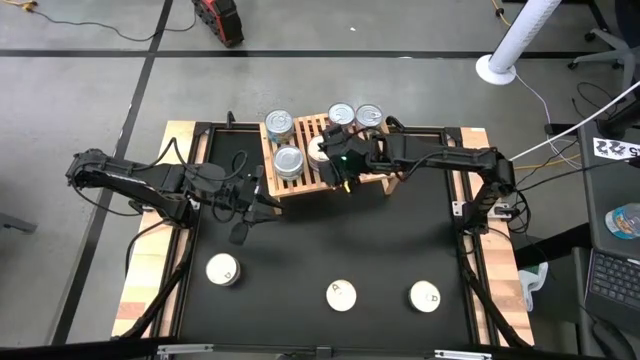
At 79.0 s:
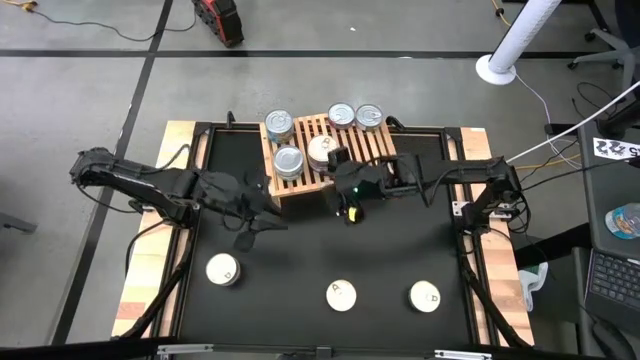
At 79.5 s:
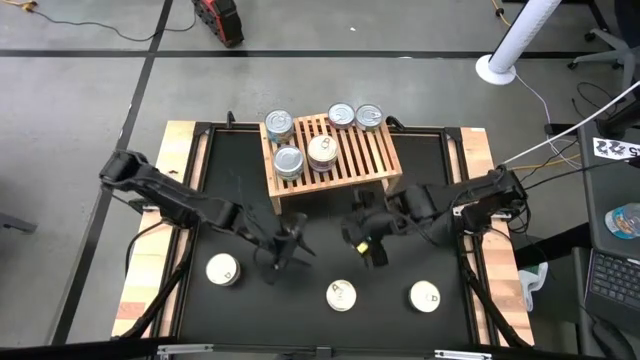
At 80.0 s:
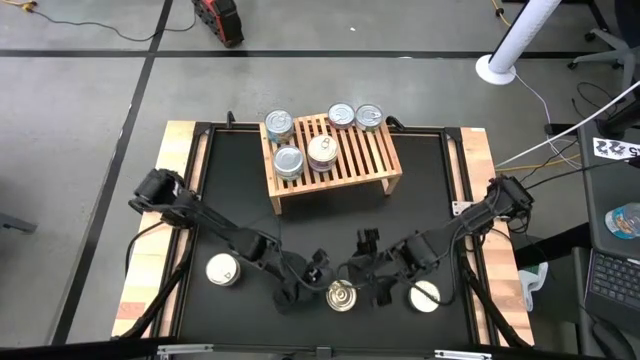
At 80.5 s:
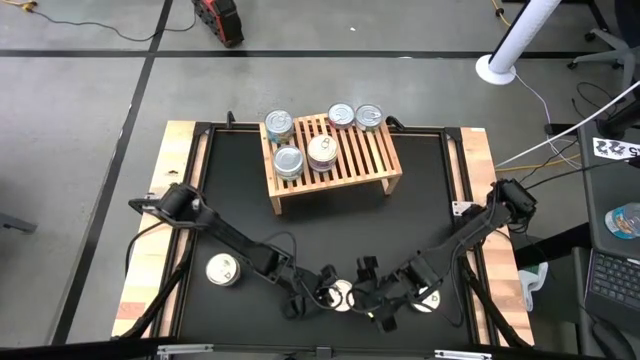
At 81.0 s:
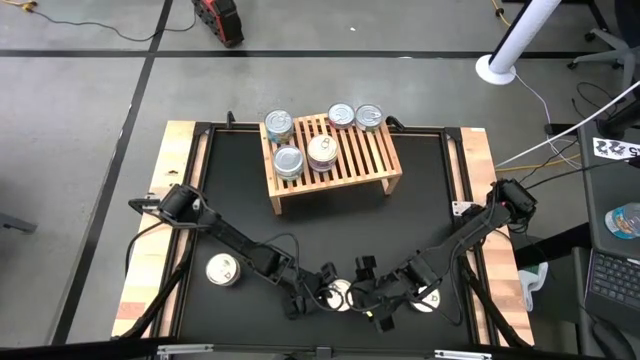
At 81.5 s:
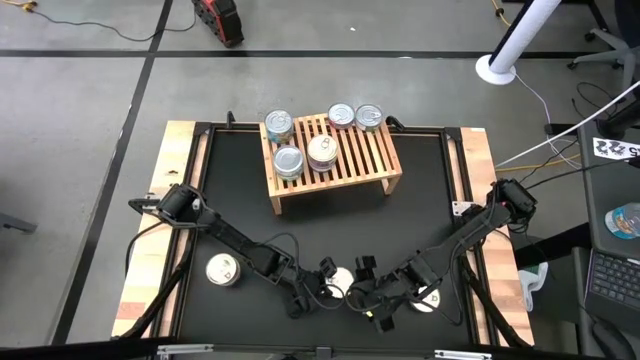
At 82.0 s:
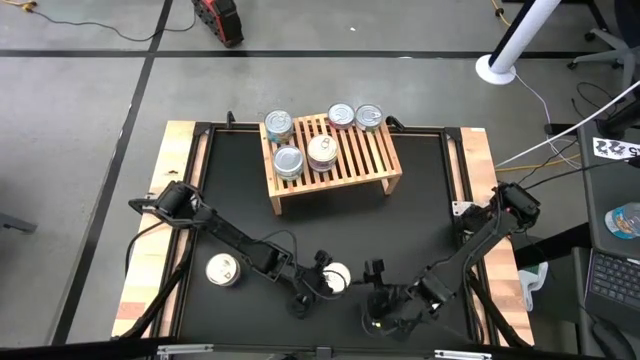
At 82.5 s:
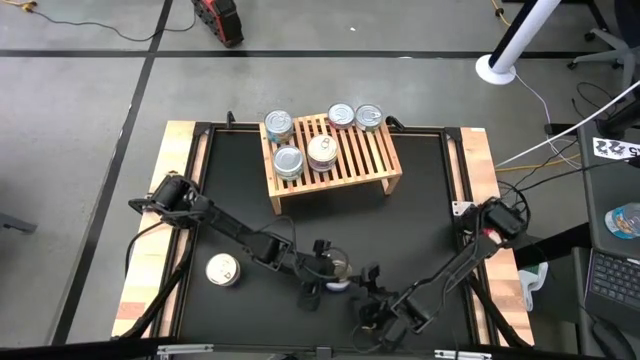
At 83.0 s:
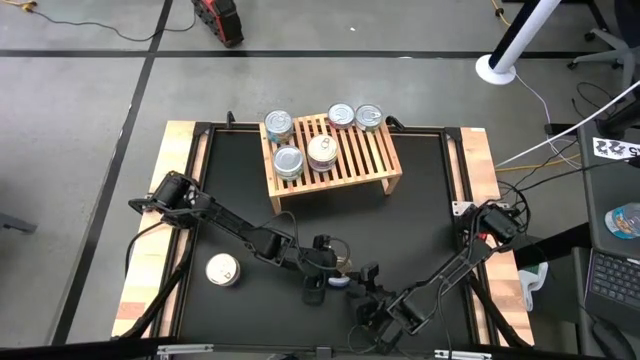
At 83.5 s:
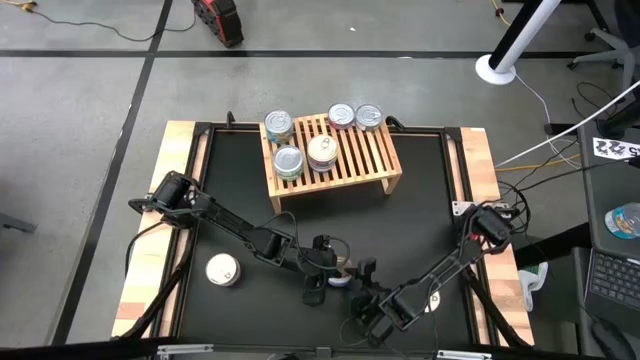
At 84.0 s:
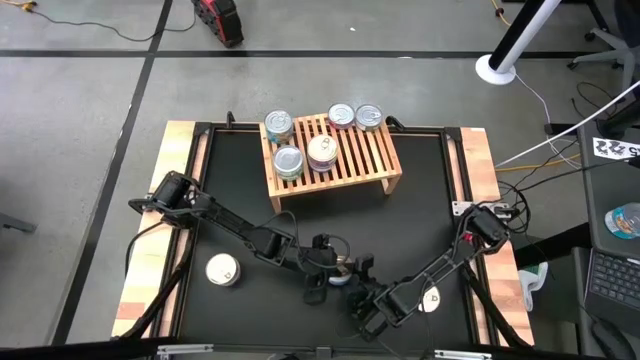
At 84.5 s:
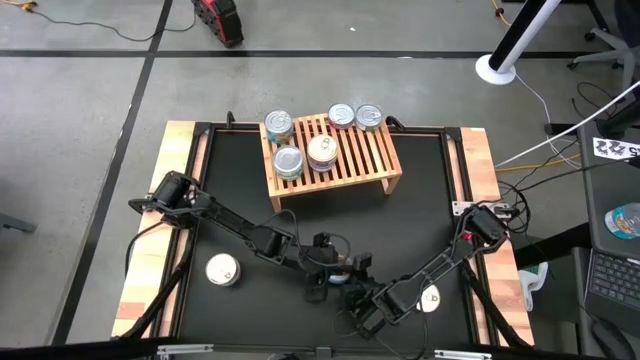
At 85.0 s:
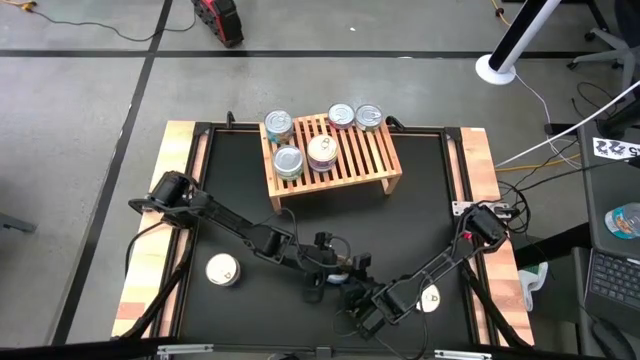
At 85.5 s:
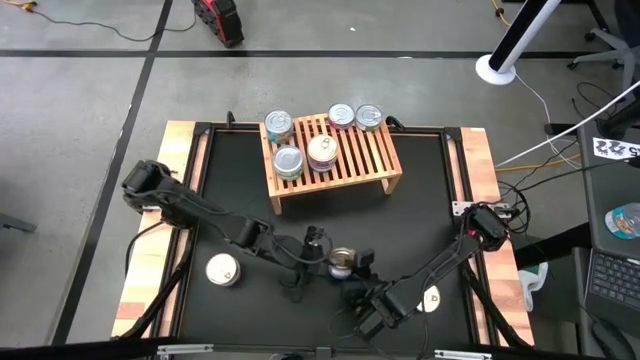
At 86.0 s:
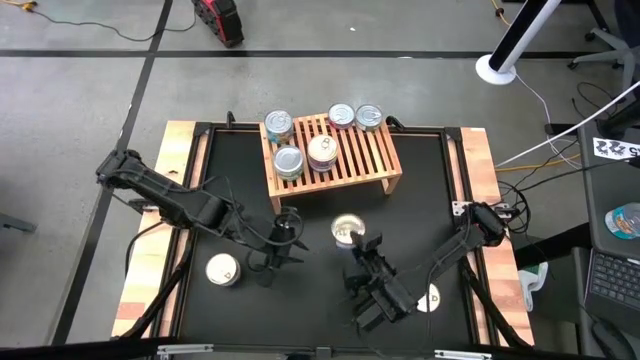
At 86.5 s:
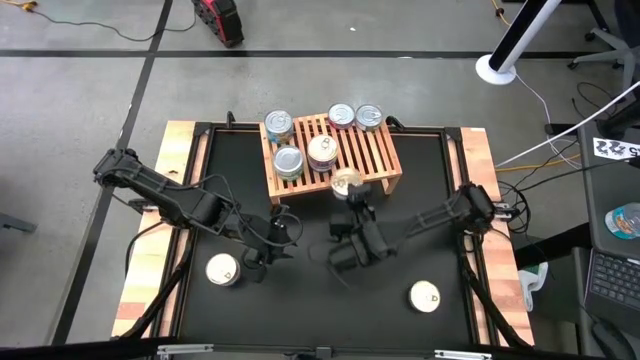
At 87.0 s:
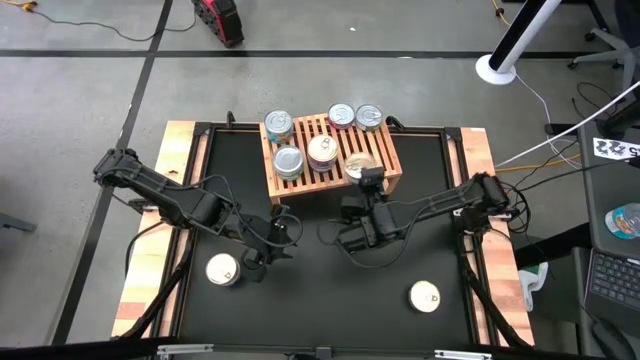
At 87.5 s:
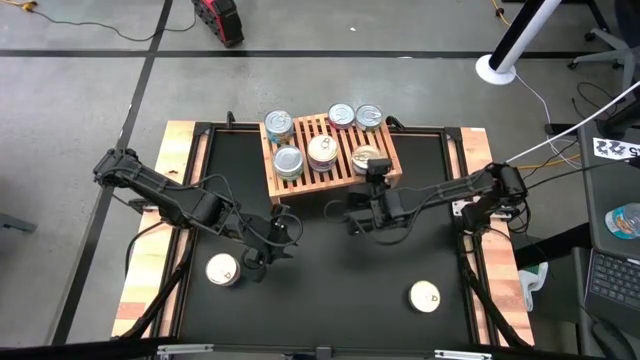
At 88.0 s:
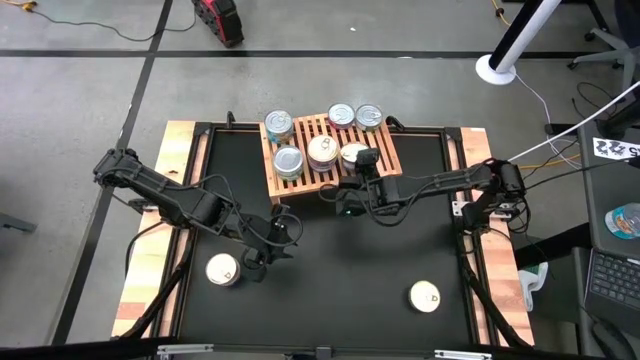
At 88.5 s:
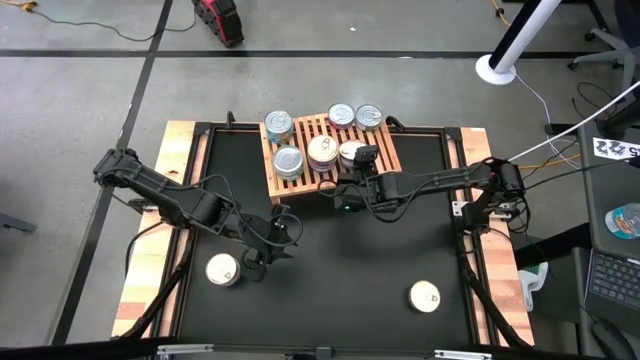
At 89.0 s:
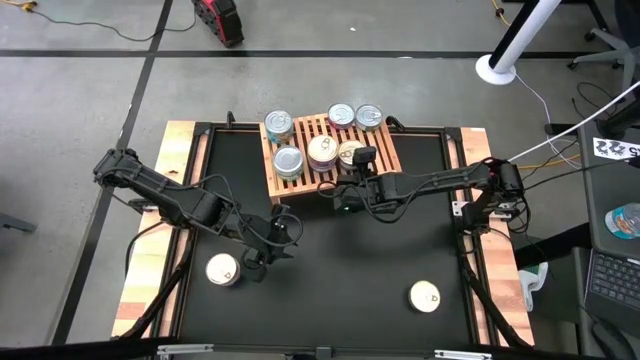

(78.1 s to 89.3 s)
Task: Stack canned seafood by type on shelf
Put the blue tuna can on the shelf

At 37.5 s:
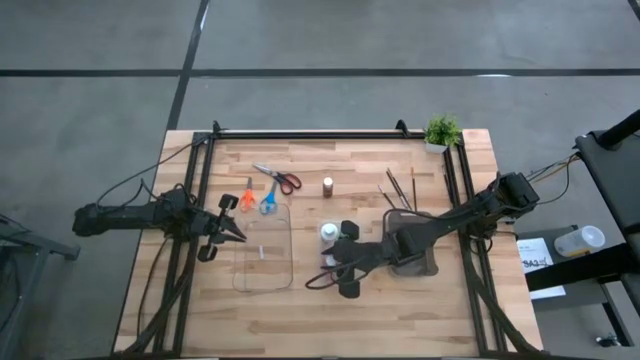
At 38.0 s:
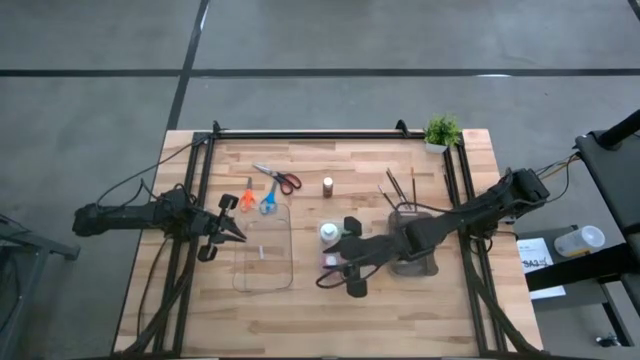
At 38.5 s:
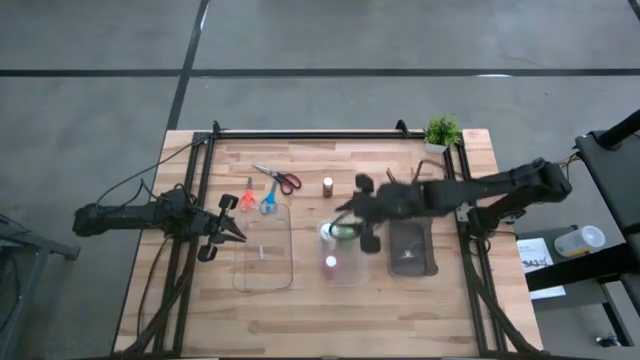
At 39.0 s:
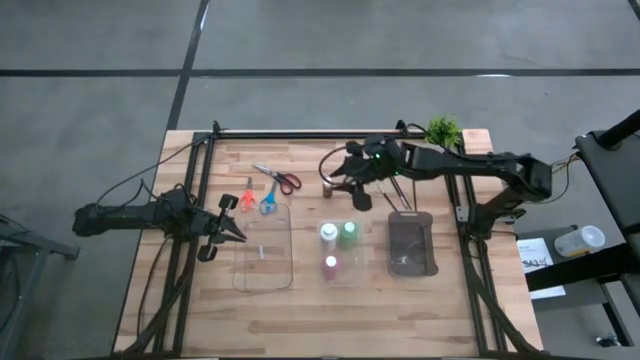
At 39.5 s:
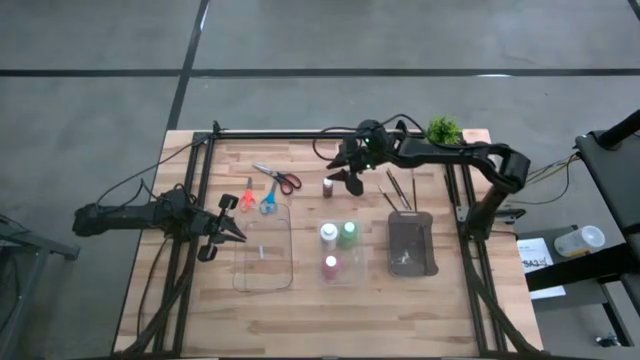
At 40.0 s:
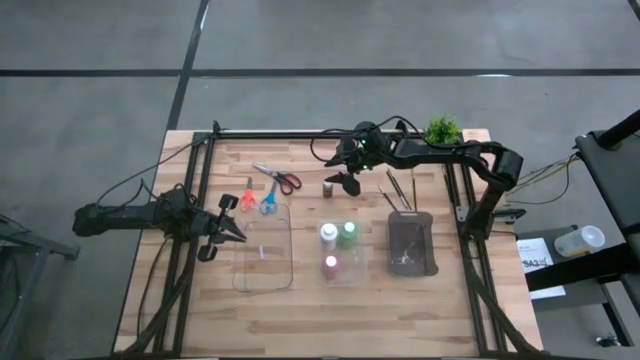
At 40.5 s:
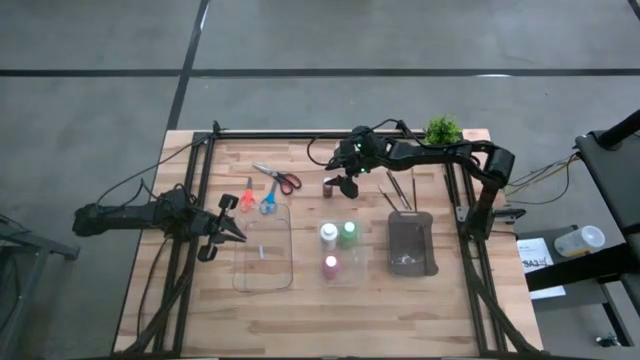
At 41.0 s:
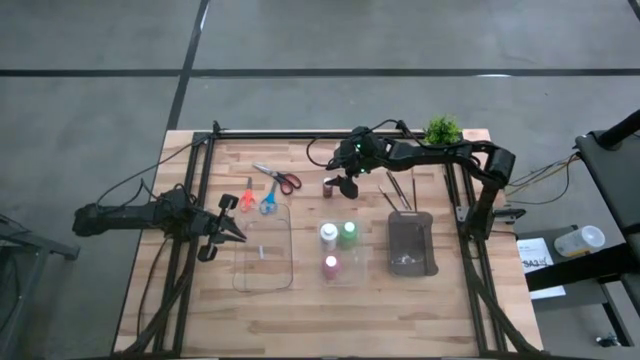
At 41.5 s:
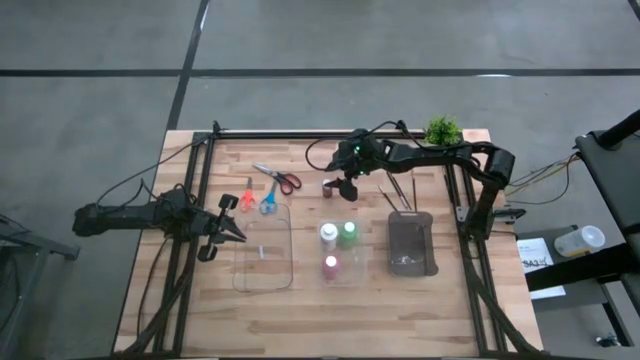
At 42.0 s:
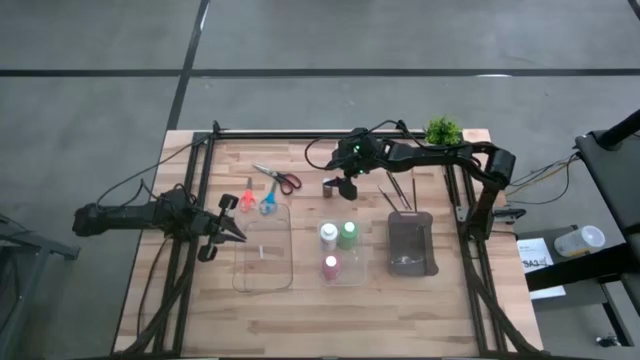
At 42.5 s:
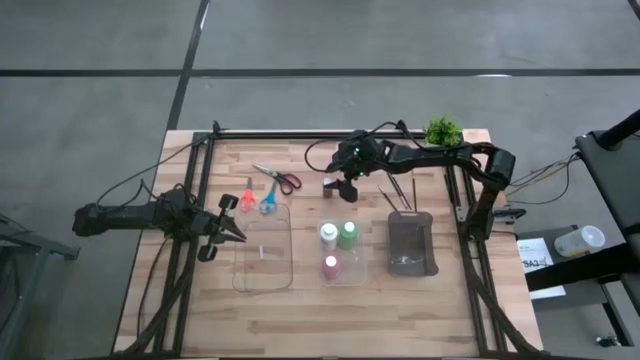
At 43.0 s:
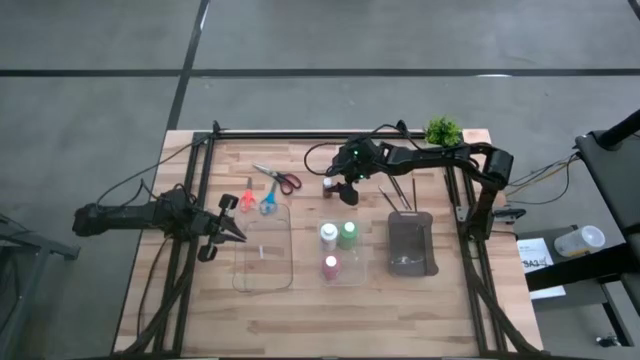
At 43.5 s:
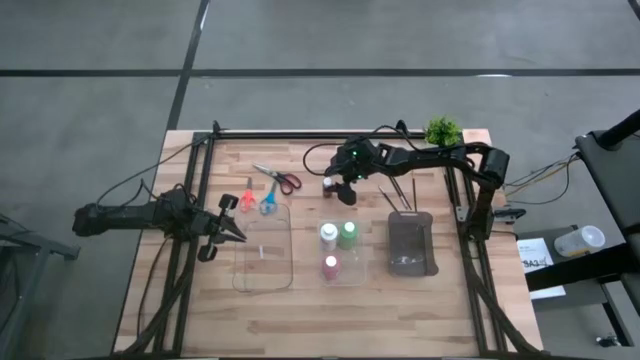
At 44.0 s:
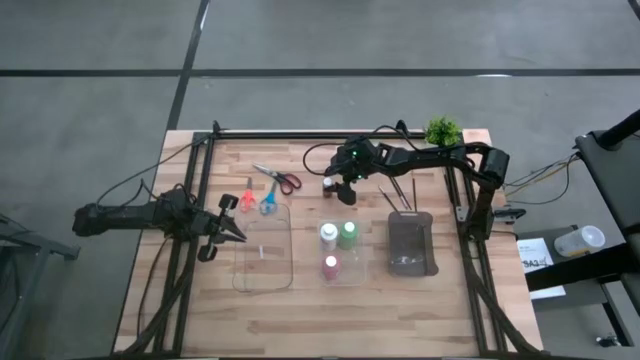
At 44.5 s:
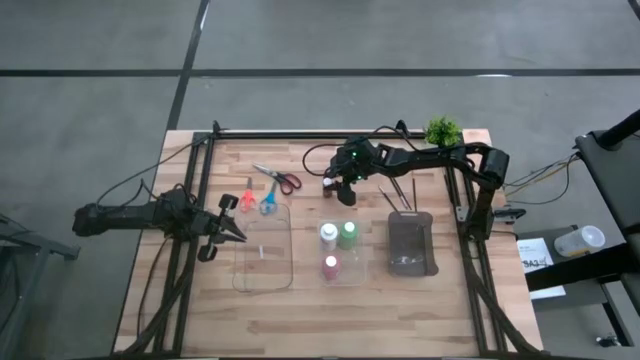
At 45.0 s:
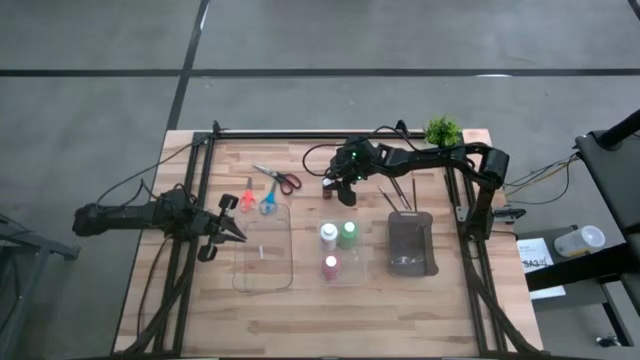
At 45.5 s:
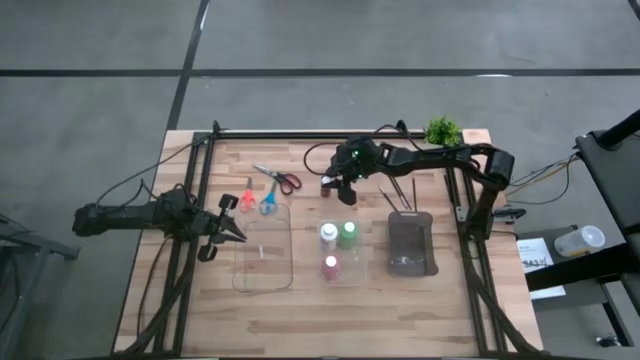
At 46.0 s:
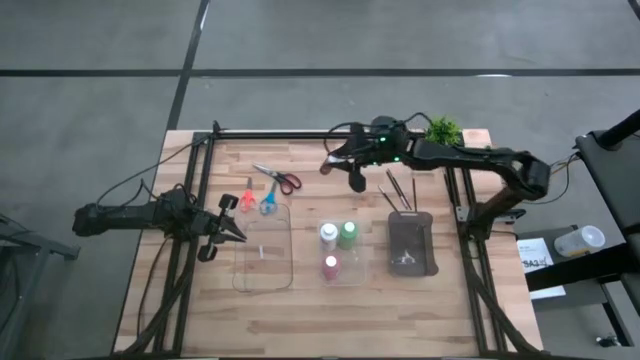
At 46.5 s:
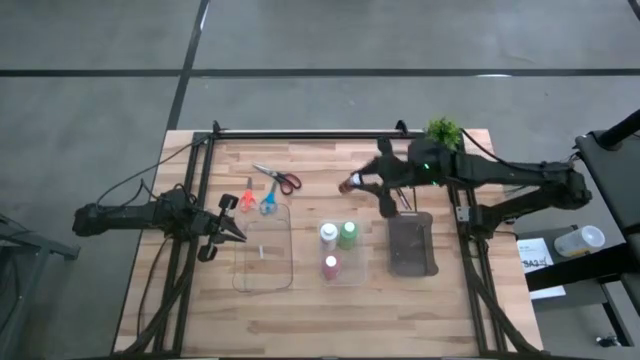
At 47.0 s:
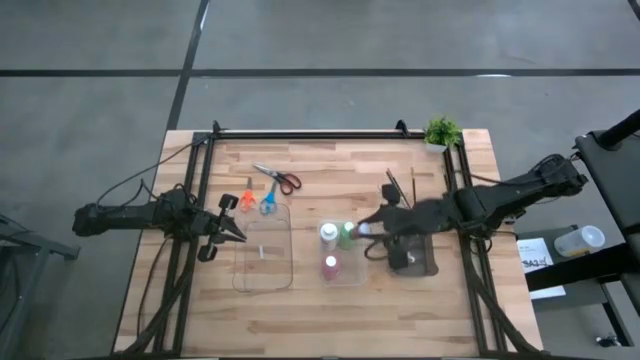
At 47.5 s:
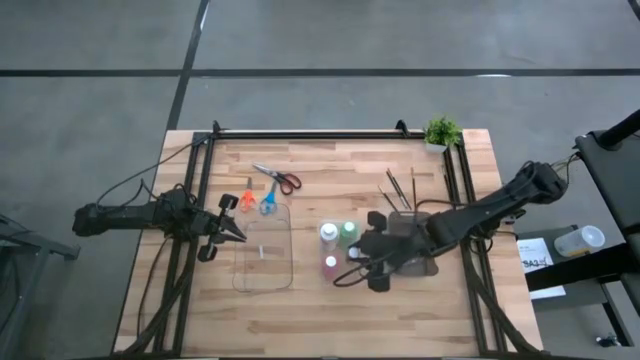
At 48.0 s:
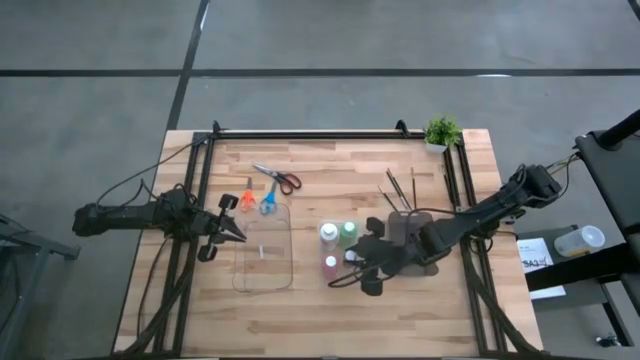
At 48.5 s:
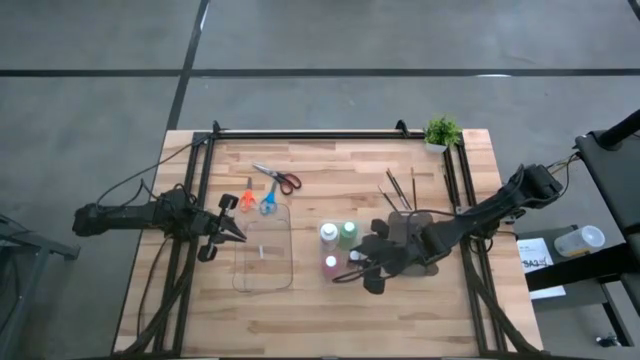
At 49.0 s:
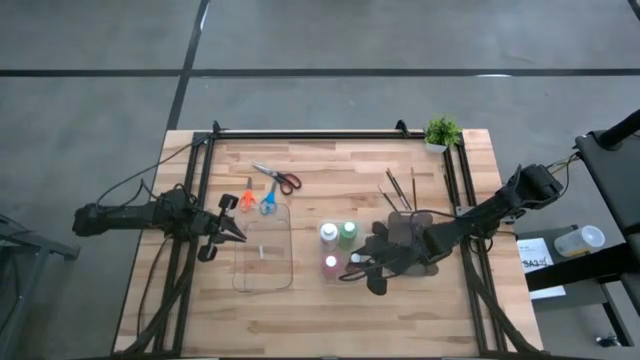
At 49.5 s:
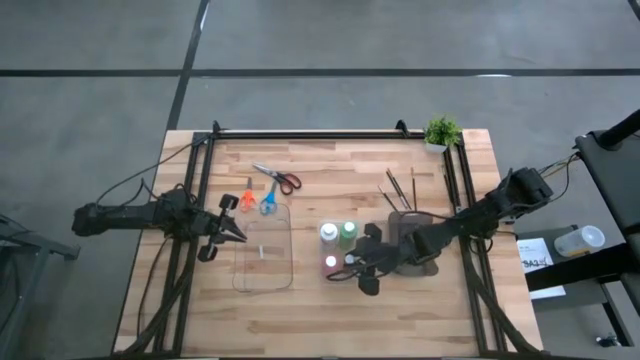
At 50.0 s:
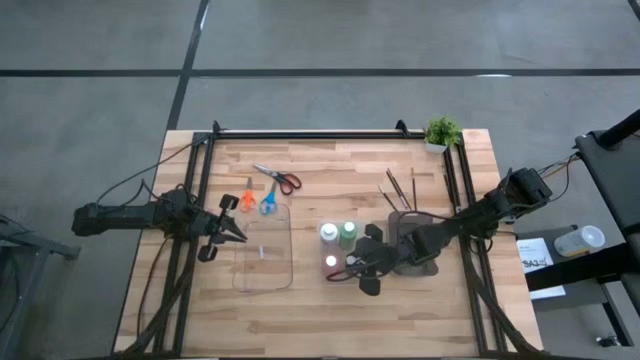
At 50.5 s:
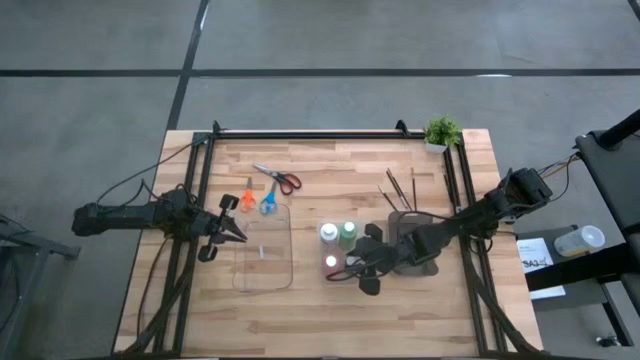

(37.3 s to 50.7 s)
Task: Pick & Place Paint Supplies
Put the small red bottle into the white transparent bin
